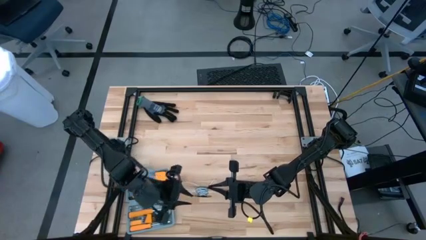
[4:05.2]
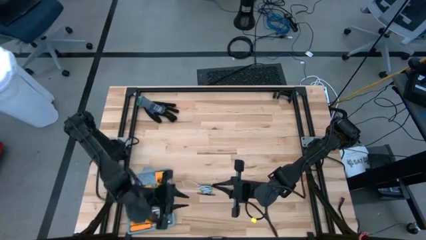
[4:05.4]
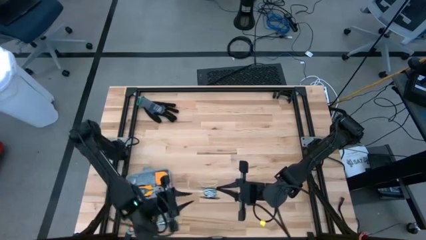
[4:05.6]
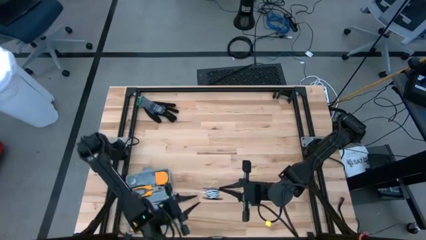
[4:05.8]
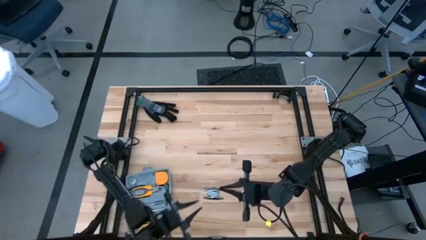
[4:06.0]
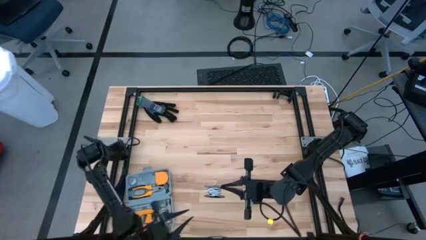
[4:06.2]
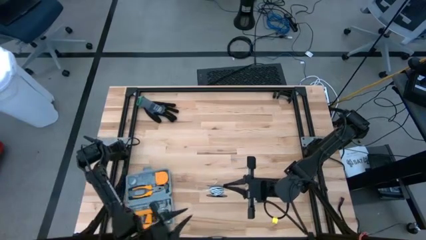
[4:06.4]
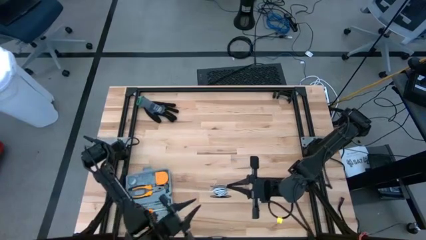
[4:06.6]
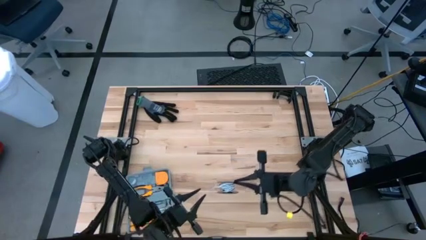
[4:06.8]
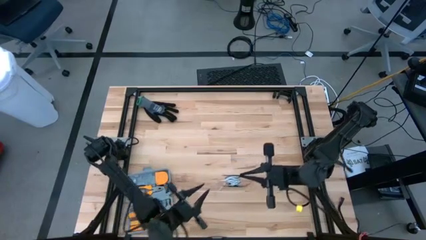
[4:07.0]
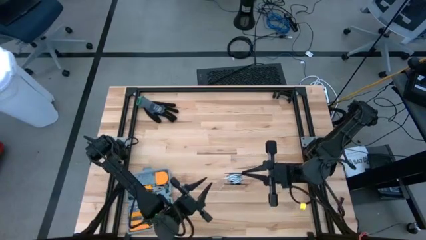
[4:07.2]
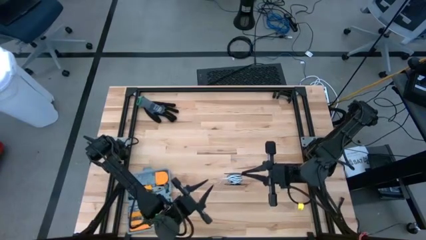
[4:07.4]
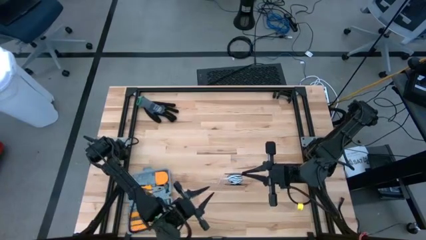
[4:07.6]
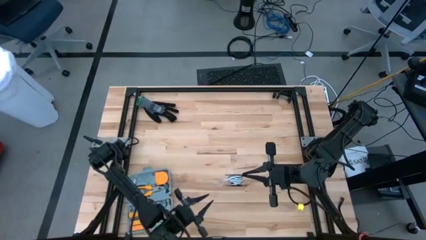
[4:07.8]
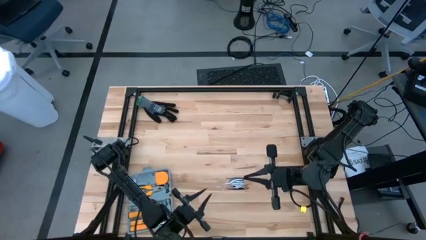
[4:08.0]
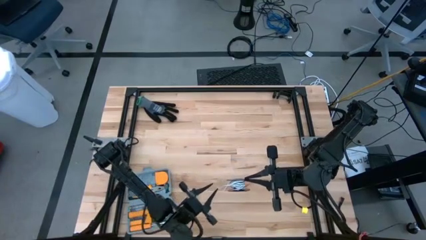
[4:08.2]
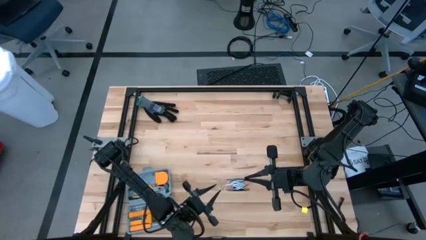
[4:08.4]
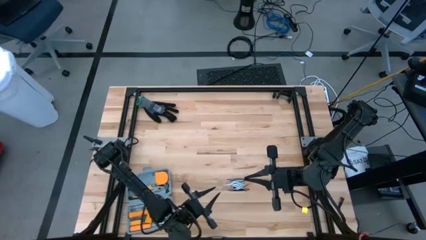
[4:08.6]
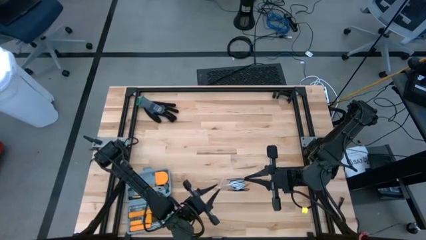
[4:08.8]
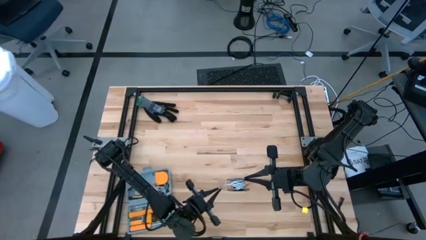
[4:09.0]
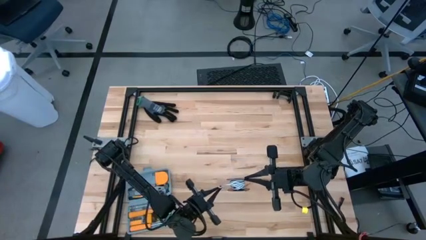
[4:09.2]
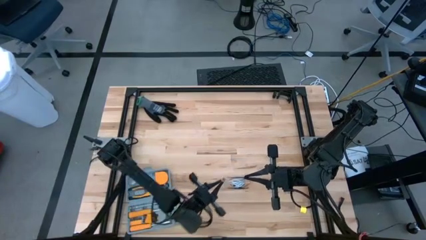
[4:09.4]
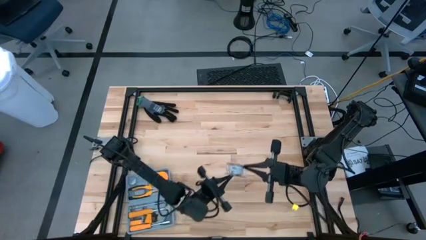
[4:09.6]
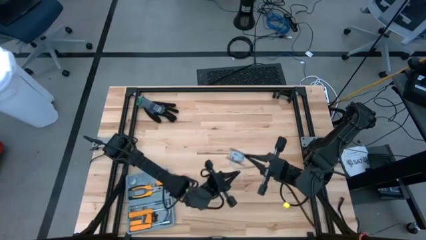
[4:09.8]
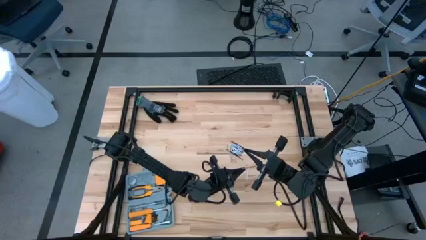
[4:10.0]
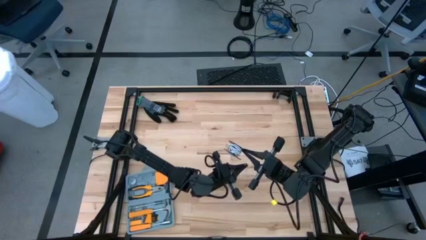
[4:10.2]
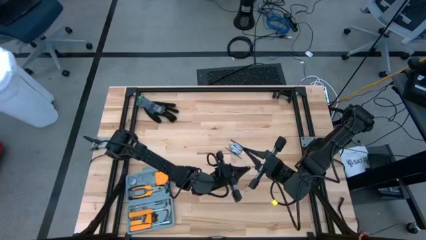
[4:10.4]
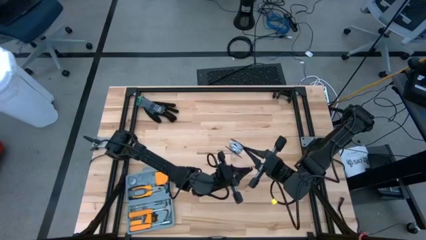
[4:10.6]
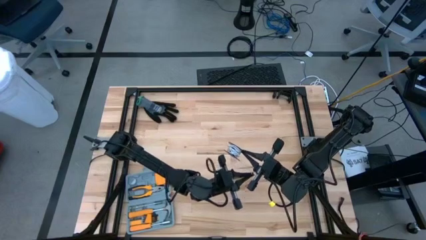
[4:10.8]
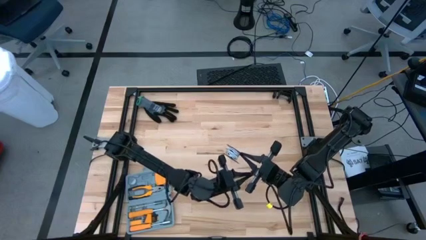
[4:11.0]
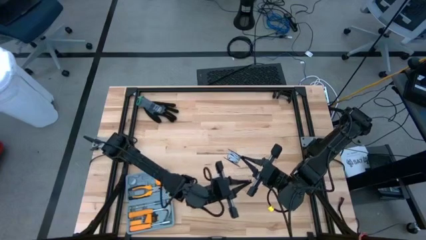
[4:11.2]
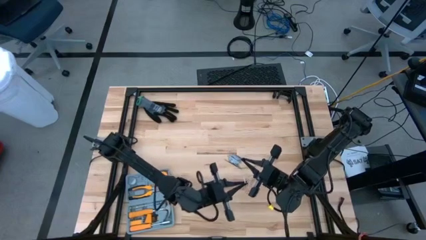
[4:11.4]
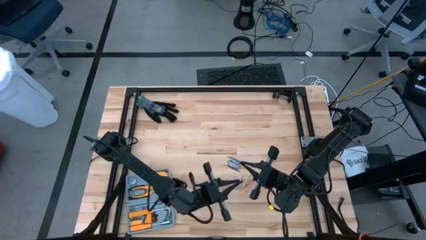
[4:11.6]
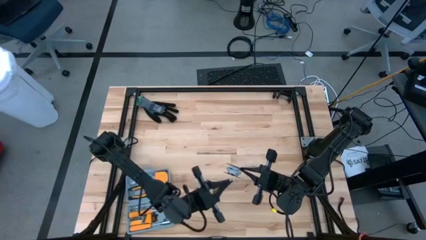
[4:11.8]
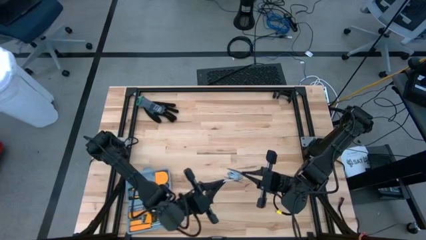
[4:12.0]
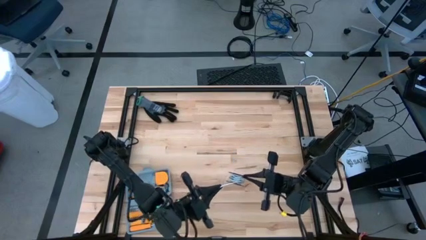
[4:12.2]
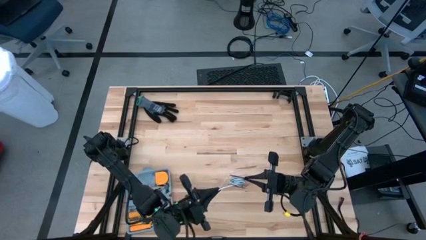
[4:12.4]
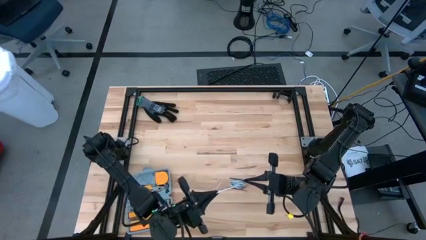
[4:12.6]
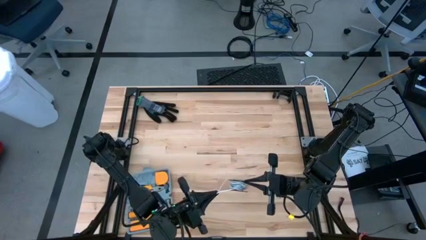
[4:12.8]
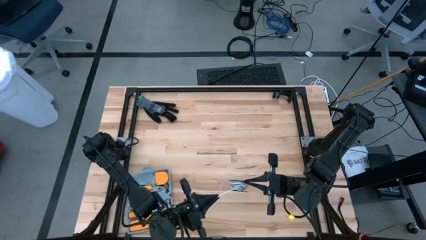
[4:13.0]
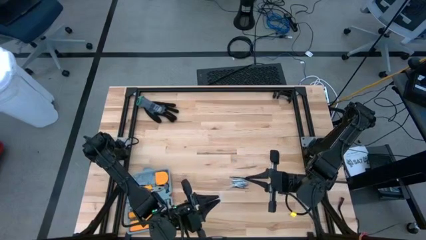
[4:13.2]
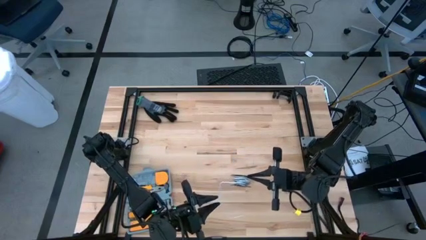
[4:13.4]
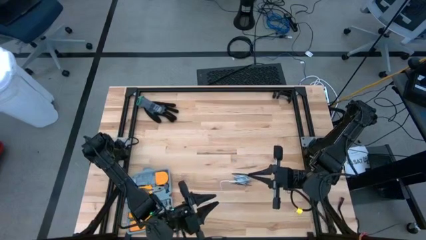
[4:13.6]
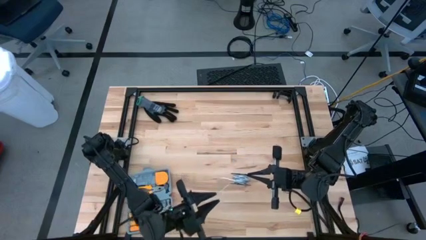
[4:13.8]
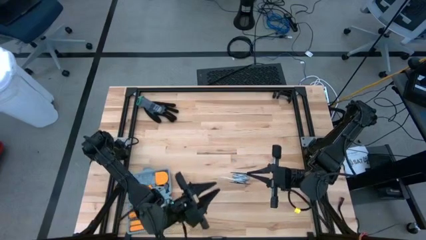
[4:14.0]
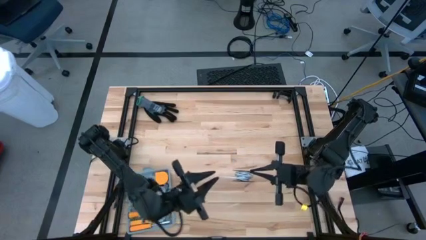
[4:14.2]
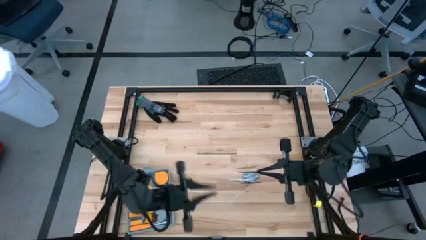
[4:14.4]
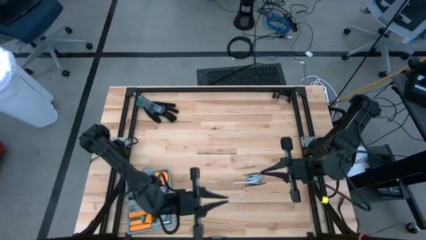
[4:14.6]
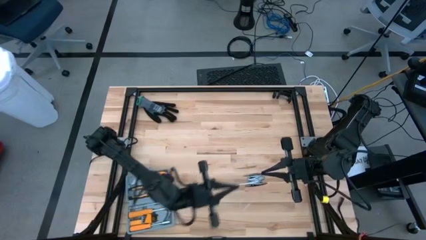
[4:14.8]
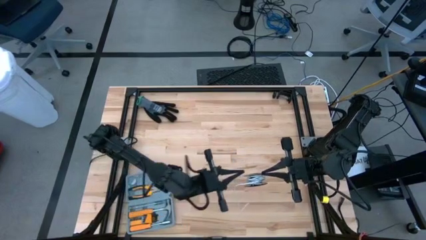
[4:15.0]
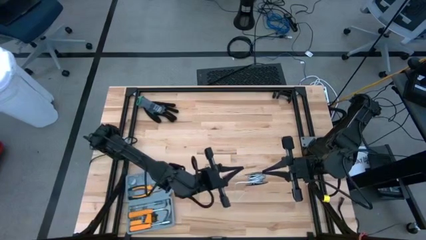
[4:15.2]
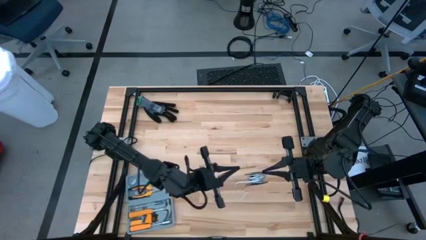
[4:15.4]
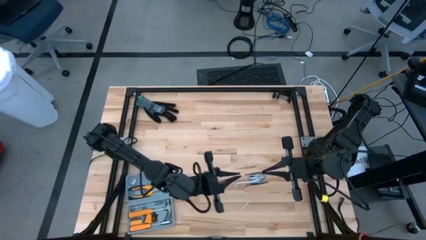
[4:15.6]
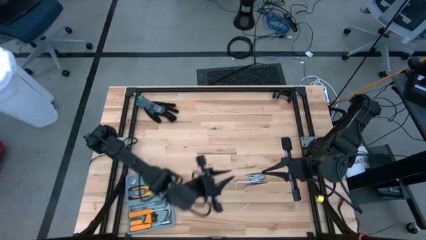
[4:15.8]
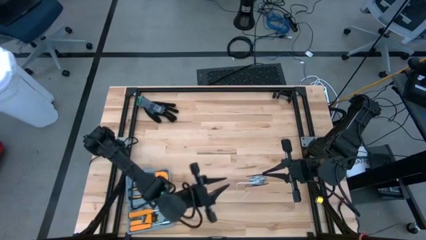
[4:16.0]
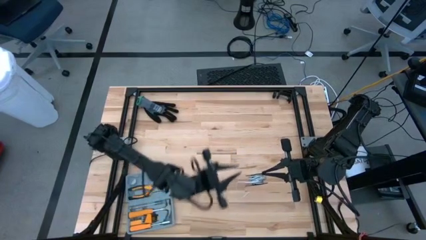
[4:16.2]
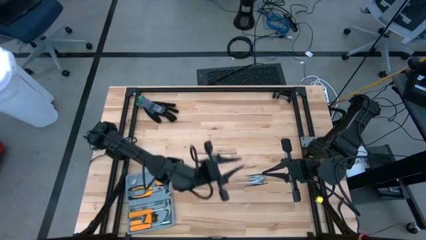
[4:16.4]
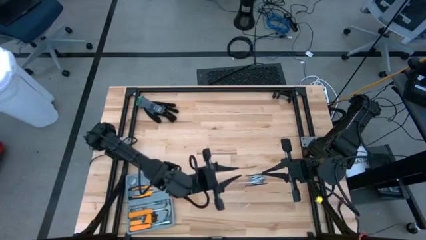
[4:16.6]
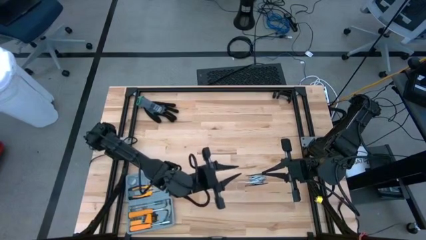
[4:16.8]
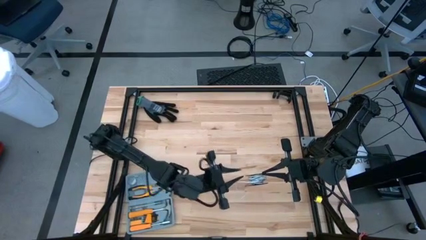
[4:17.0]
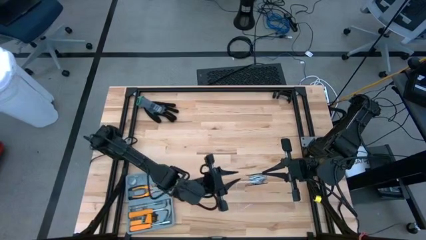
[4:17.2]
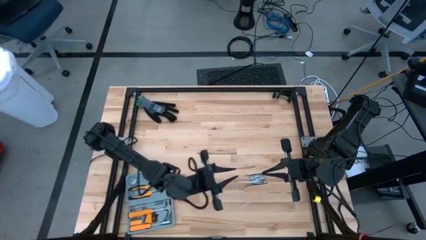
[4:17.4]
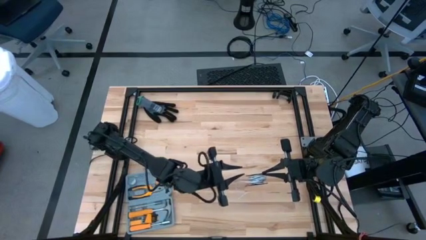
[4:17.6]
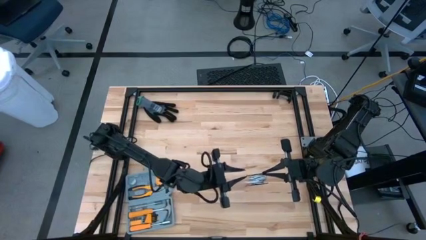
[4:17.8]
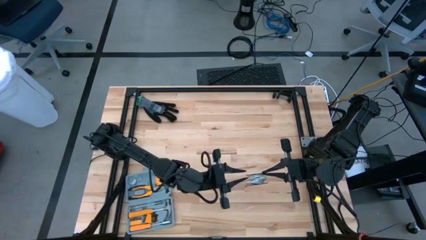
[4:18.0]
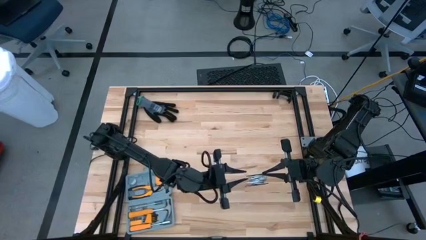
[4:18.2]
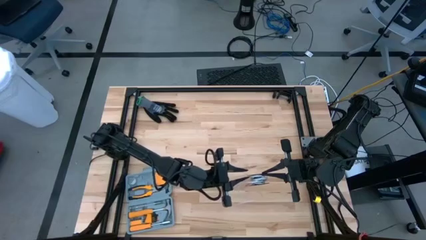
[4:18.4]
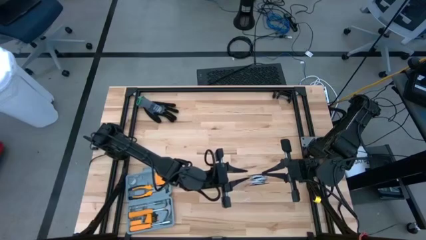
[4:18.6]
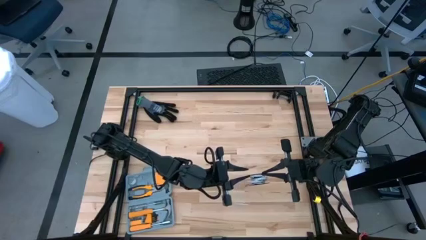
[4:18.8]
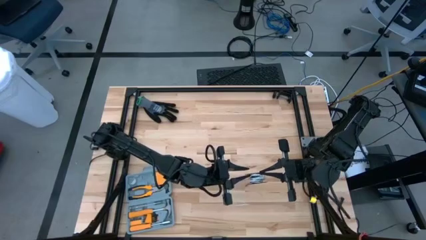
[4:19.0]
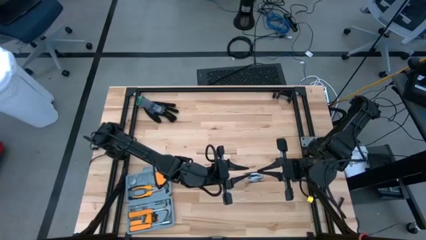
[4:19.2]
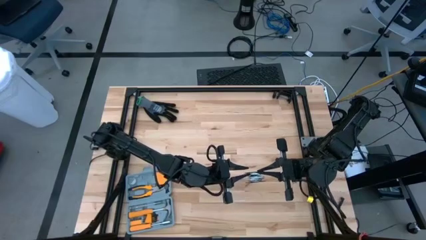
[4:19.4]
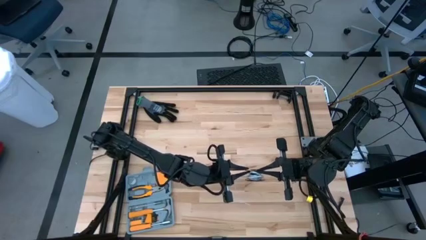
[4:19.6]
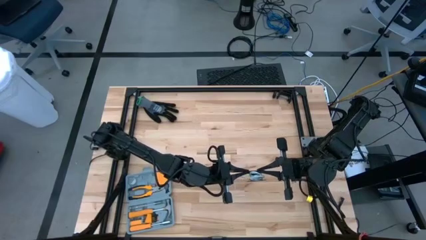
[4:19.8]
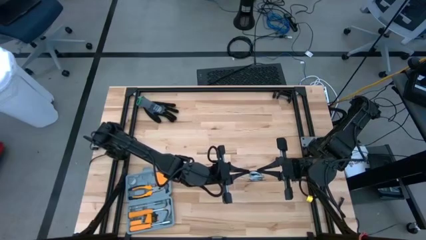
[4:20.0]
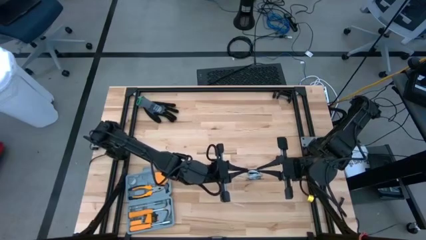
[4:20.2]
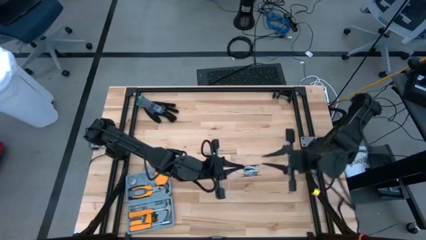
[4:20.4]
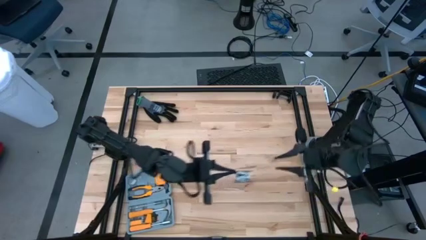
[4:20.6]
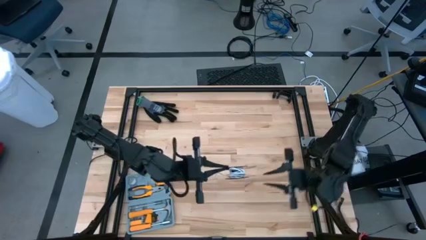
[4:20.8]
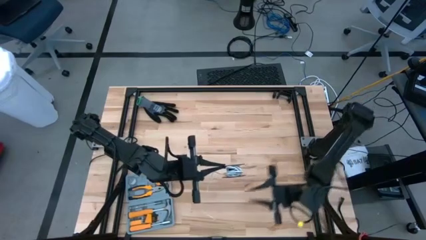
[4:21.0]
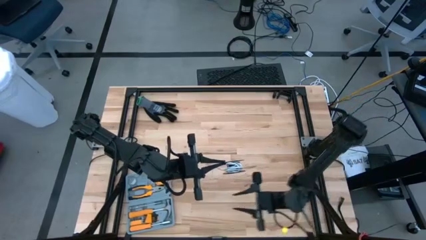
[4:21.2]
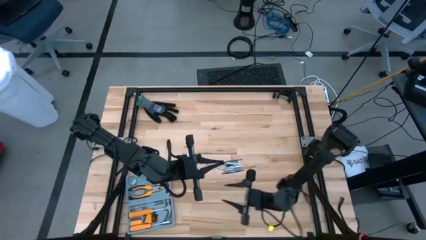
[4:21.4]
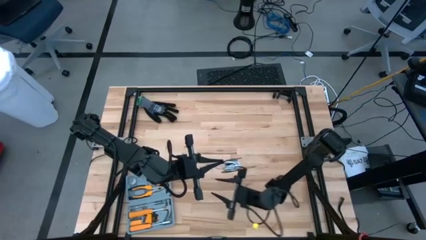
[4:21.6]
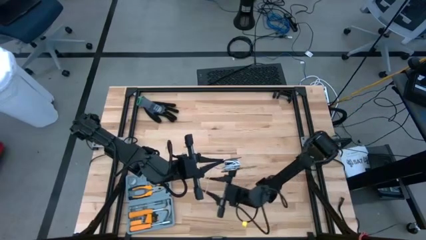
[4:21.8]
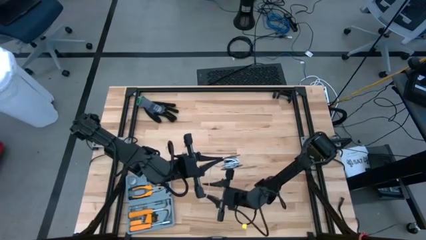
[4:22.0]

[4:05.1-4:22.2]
Task: Coil cords
Coil the white cable wire into the spool
